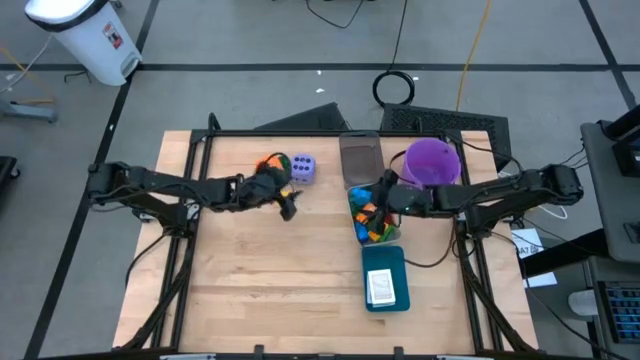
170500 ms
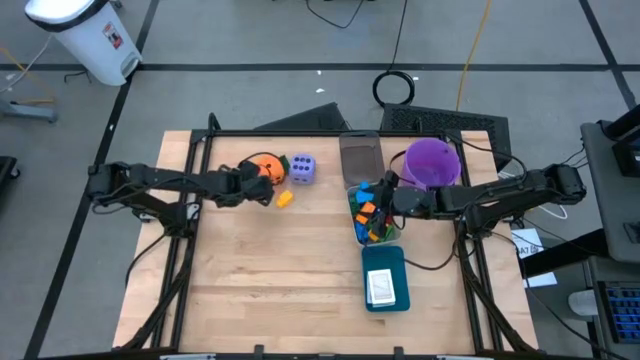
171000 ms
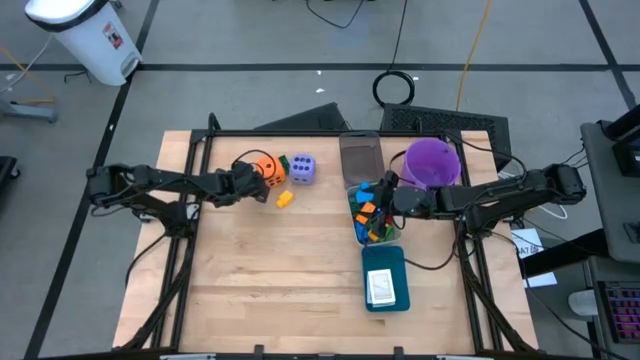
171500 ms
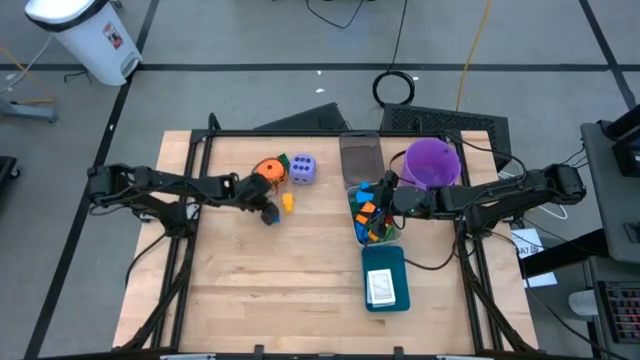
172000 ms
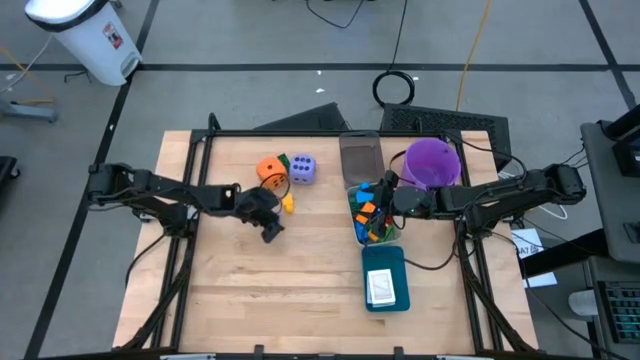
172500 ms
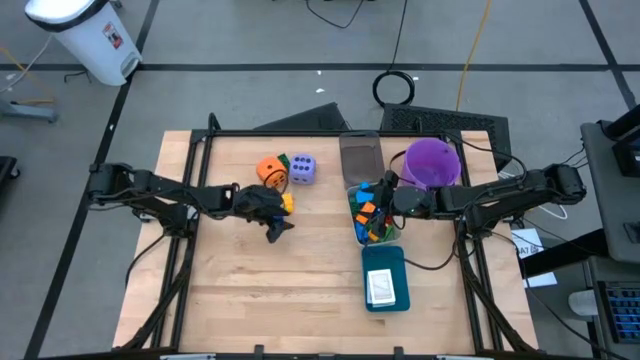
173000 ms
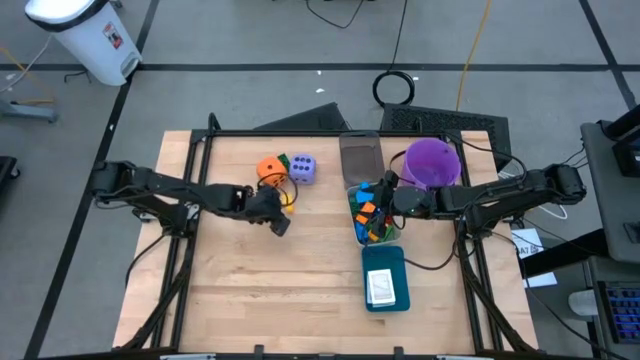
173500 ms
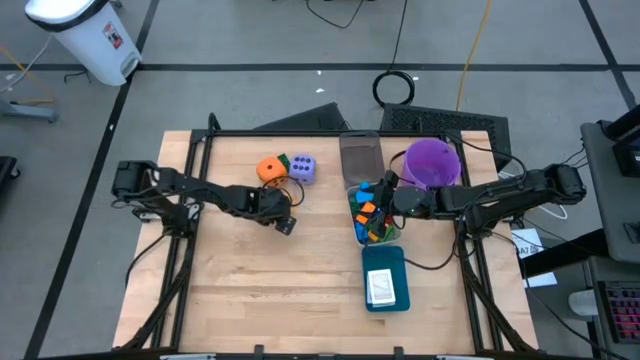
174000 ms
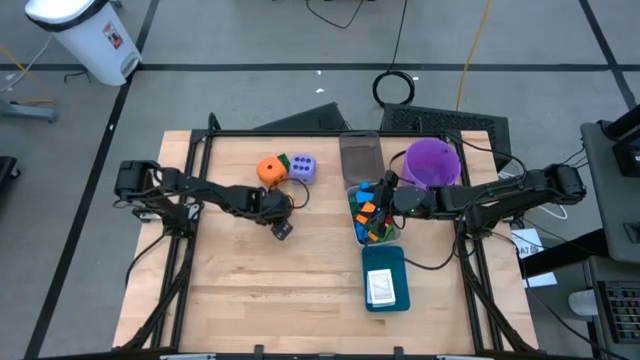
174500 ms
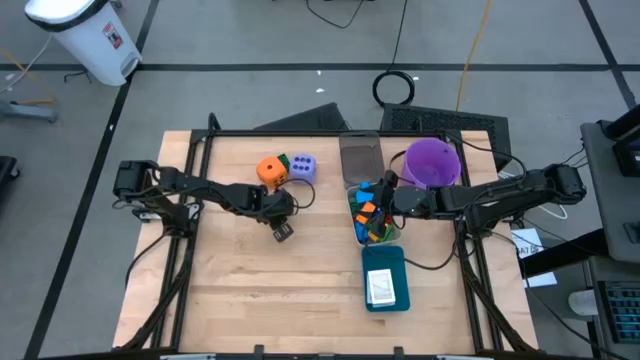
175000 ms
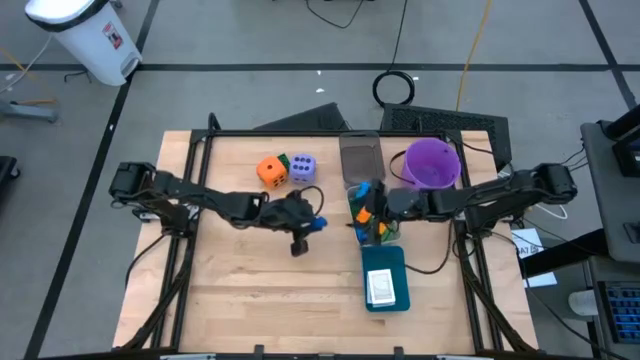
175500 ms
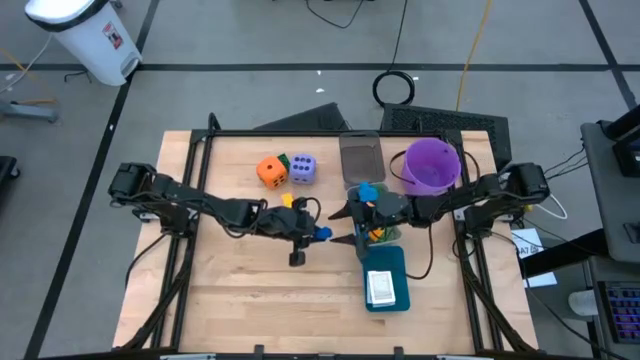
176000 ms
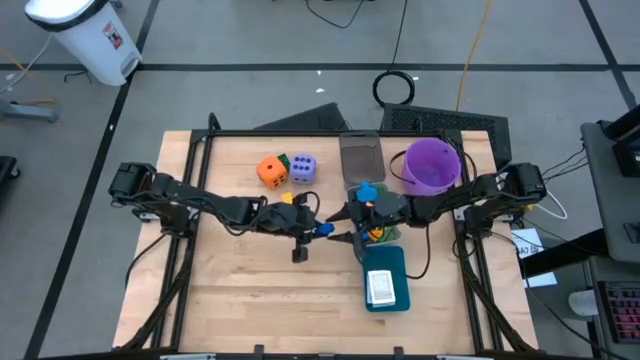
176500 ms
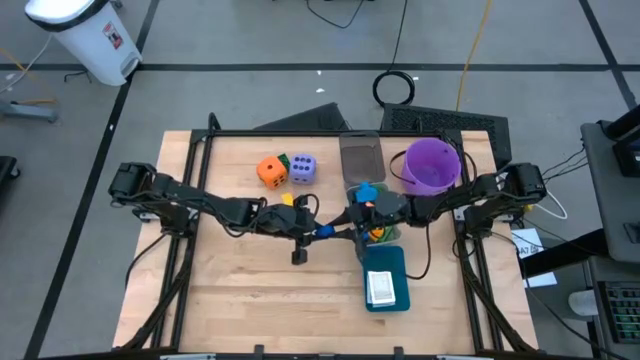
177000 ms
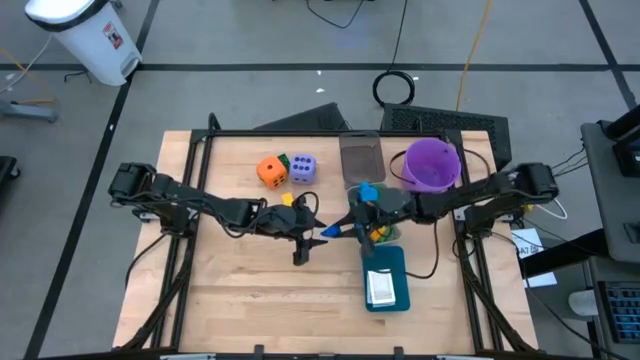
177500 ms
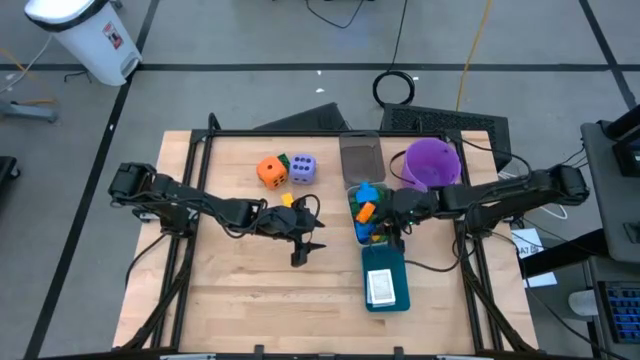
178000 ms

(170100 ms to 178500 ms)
Task: Pick & Place Toys
Put the dark blue game piece into the gray bin

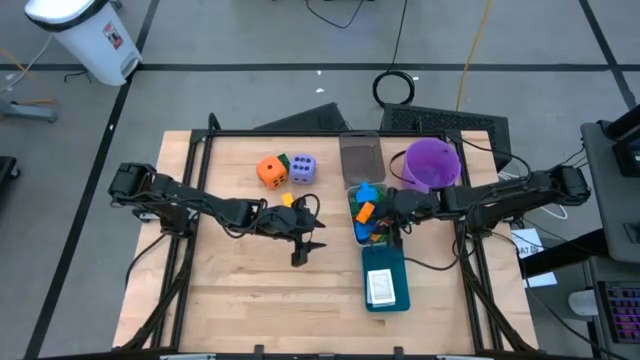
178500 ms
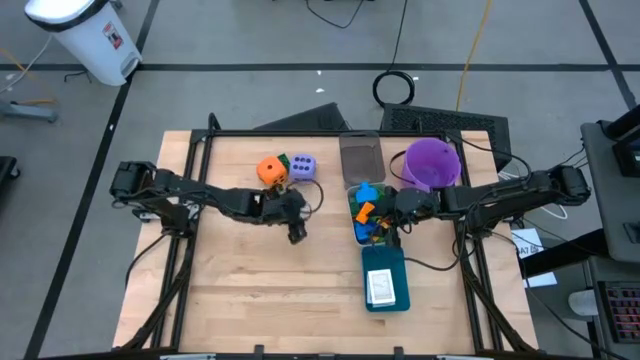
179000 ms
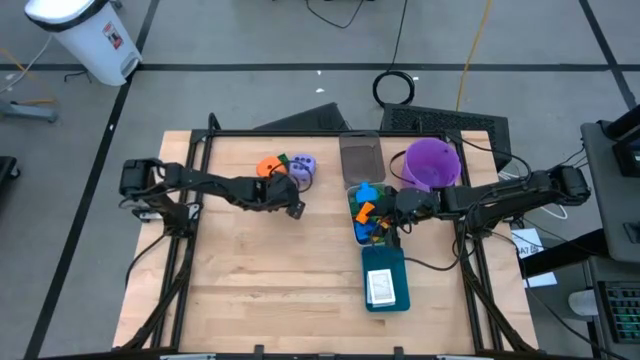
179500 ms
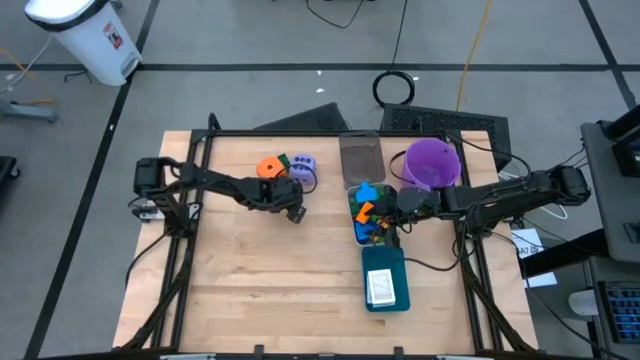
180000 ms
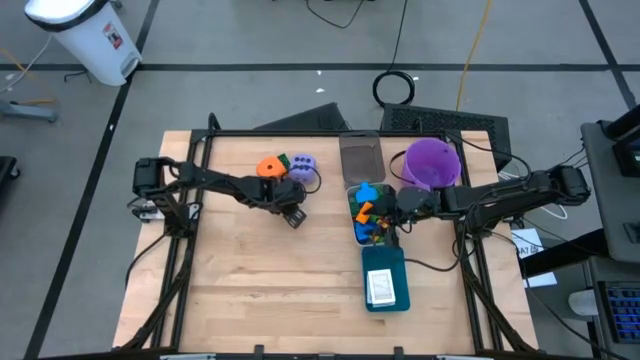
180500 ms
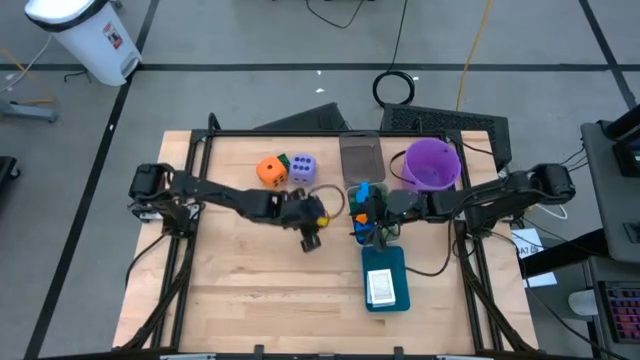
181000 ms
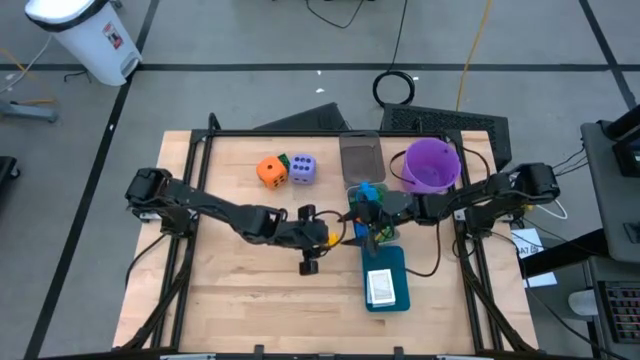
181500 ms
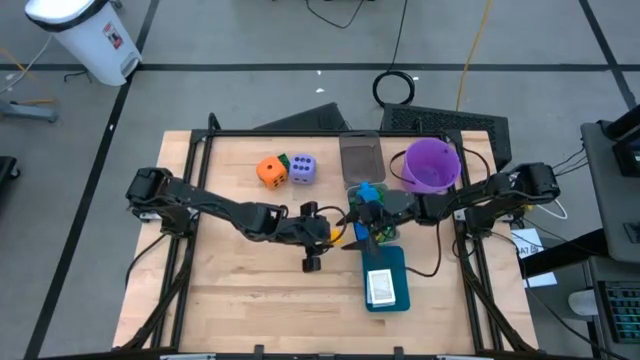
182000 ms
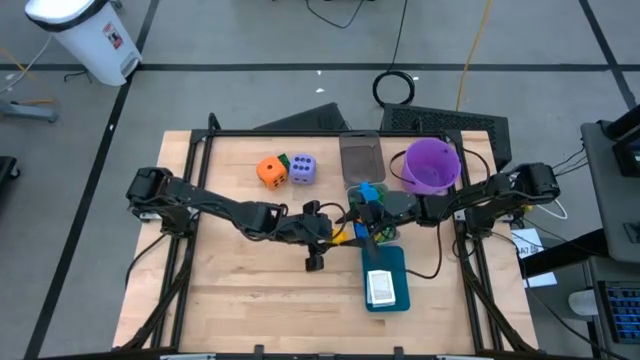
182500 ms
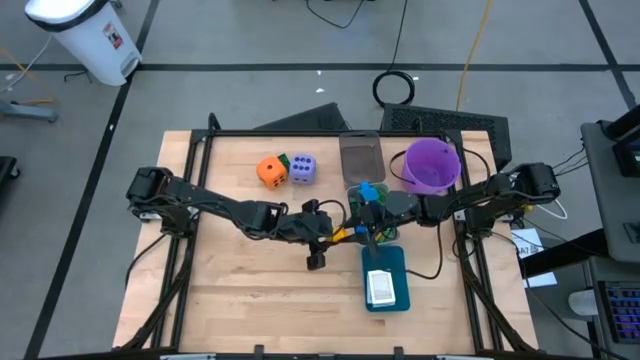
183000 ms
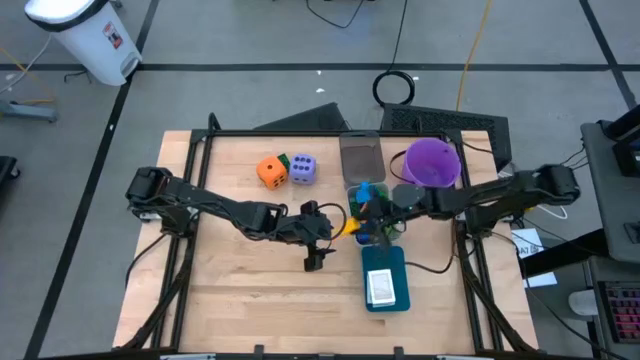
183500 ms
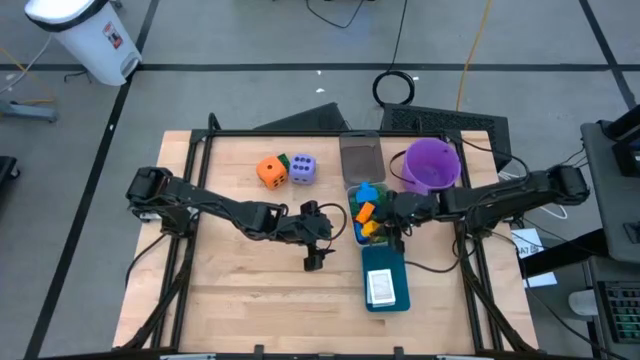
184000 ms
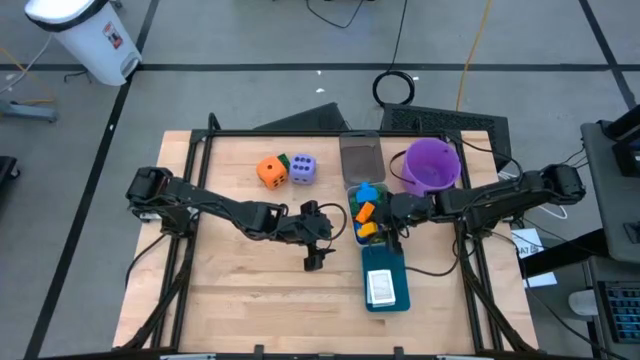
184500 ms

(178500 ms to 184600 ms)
Put the yellow game piece into the gray bin

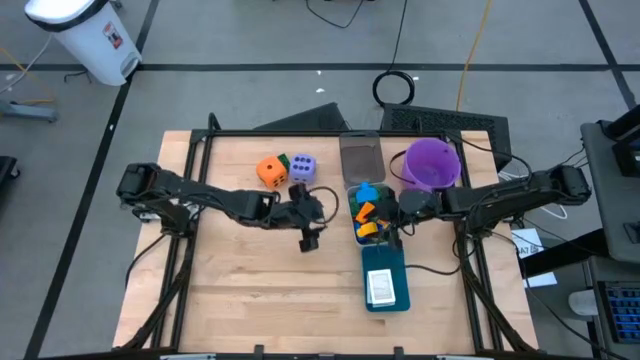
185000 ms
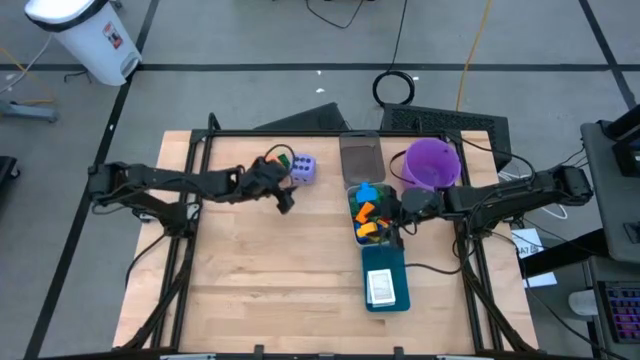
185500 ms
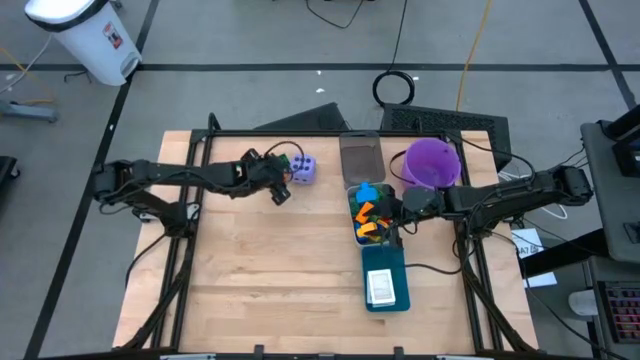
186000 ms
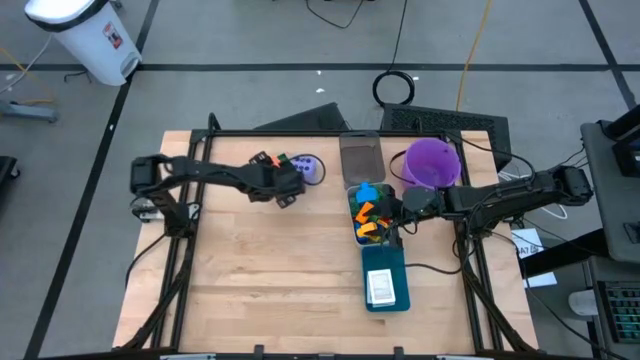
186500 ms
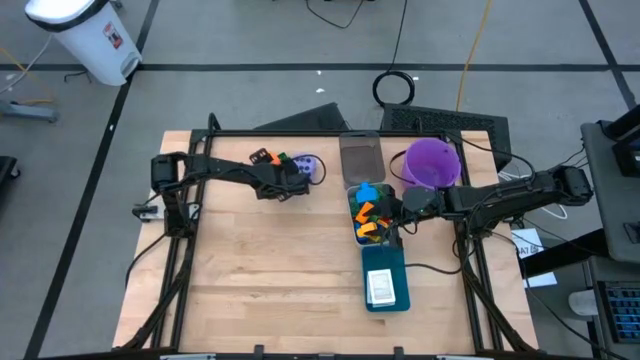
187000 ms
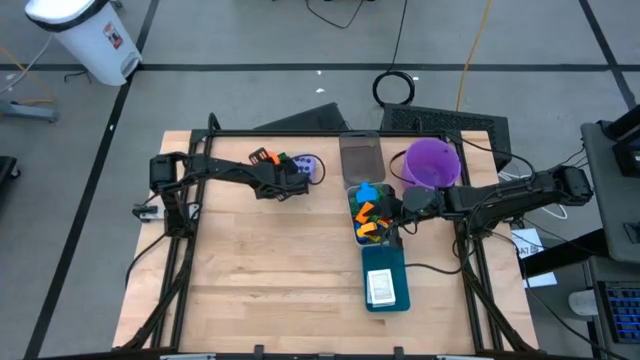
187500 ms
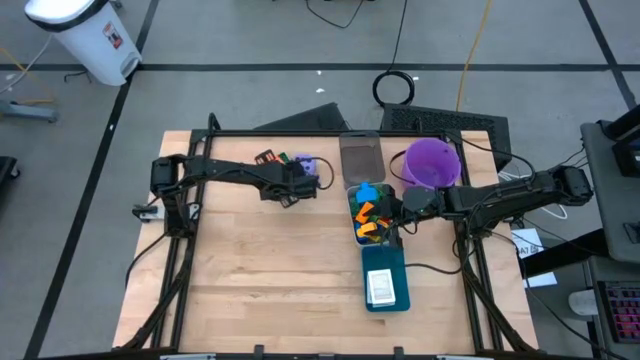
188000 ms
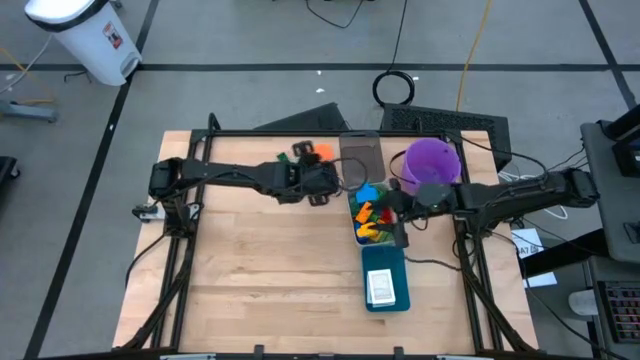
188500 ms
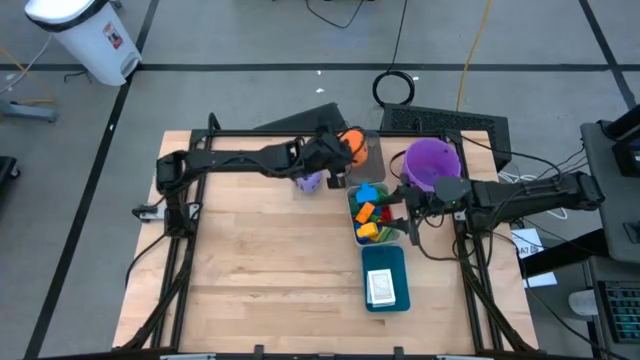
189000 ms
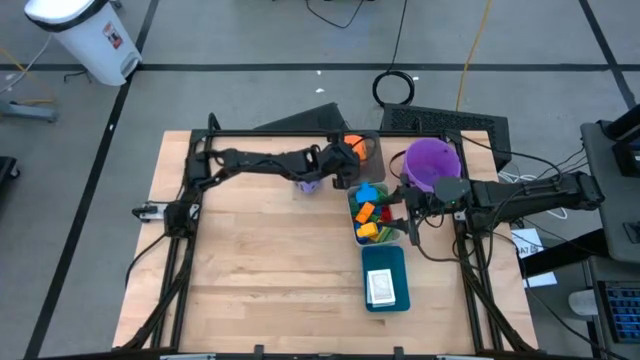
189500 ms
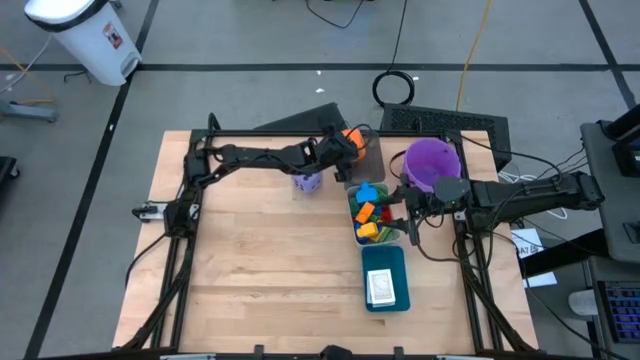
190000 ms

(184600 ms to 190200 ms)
Put the orange dice into the black transparent bin
